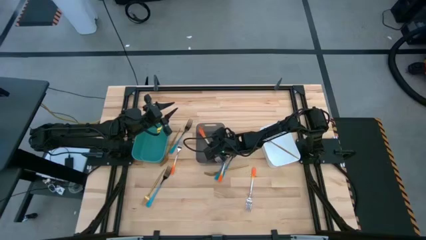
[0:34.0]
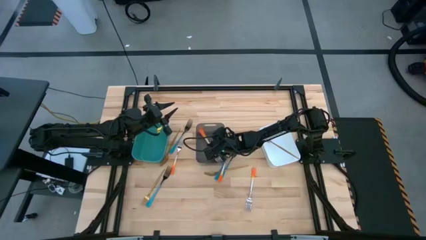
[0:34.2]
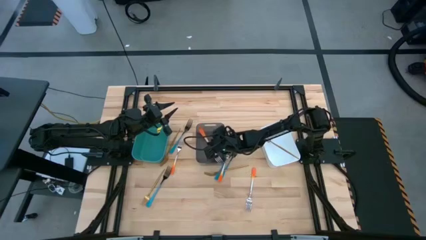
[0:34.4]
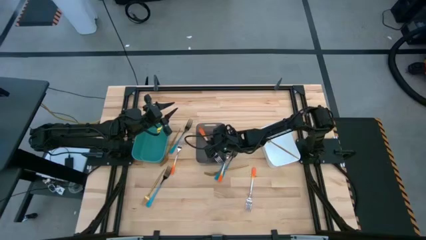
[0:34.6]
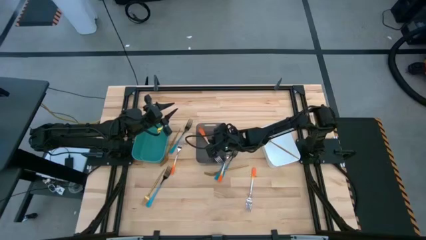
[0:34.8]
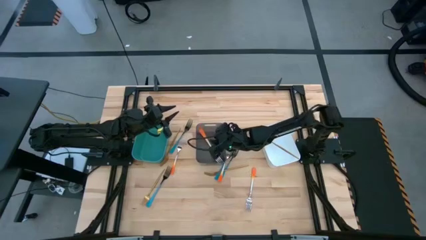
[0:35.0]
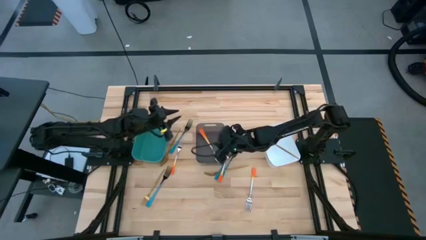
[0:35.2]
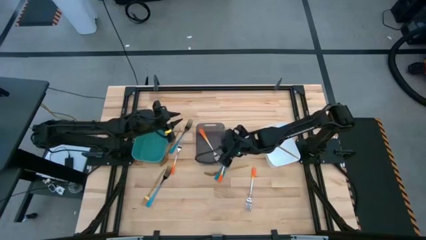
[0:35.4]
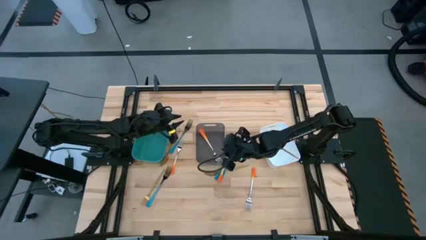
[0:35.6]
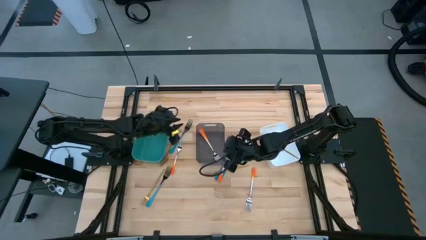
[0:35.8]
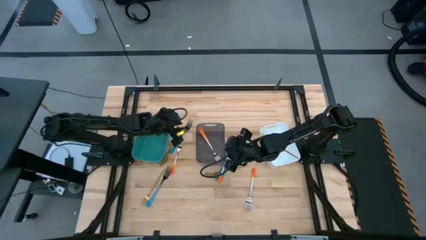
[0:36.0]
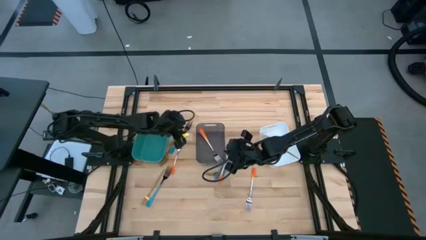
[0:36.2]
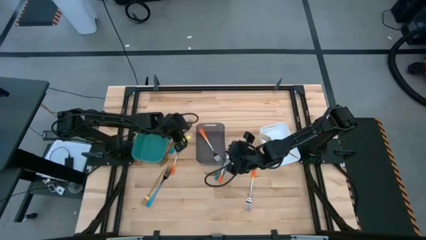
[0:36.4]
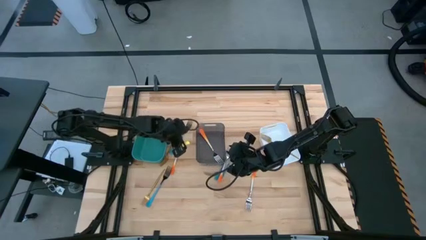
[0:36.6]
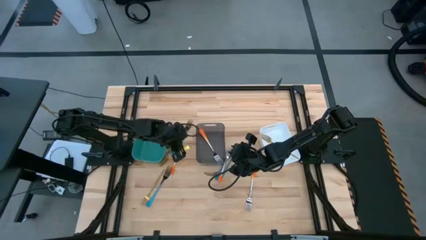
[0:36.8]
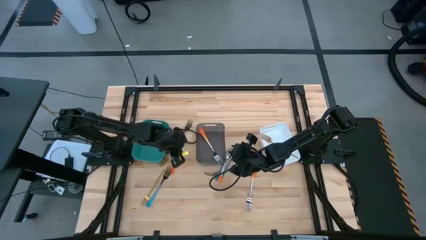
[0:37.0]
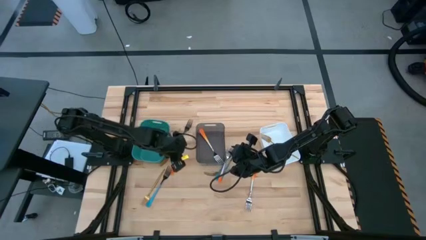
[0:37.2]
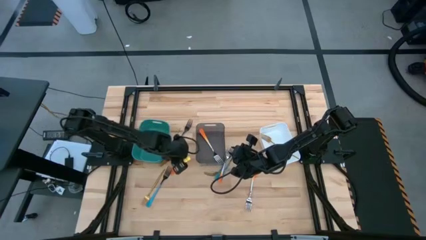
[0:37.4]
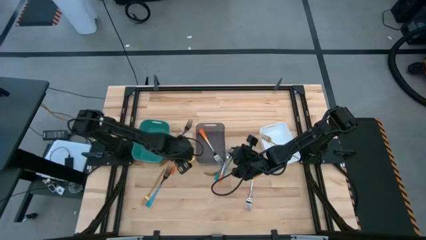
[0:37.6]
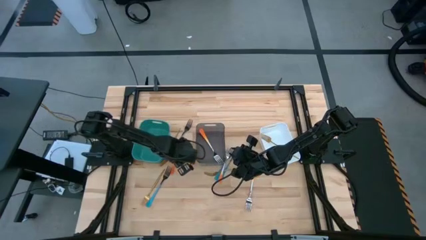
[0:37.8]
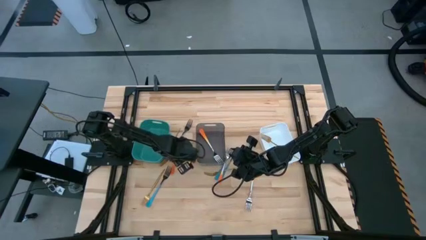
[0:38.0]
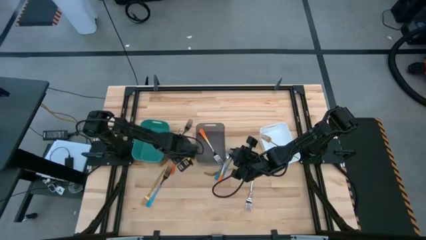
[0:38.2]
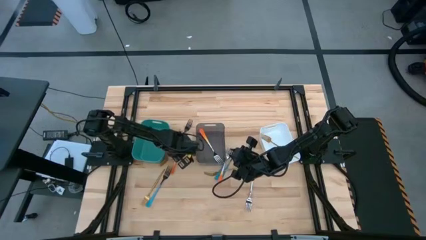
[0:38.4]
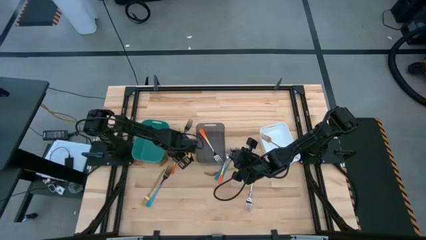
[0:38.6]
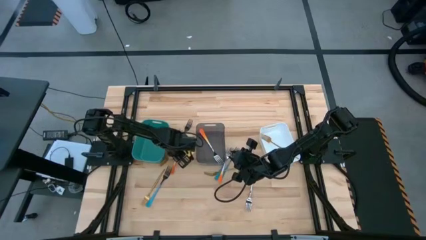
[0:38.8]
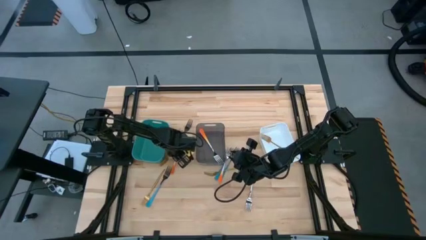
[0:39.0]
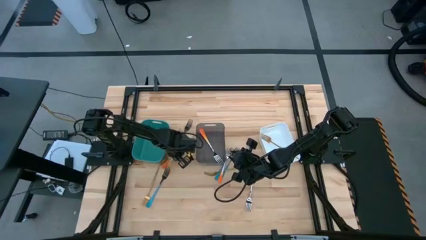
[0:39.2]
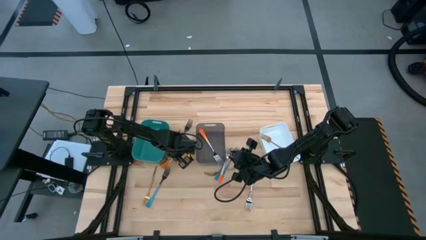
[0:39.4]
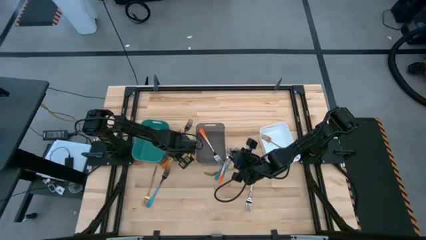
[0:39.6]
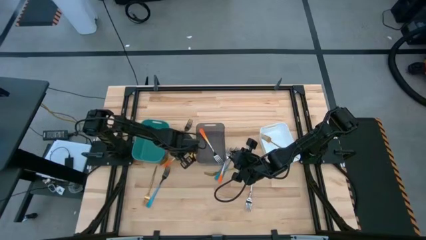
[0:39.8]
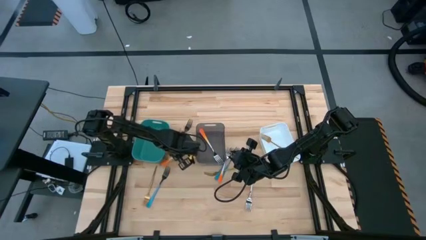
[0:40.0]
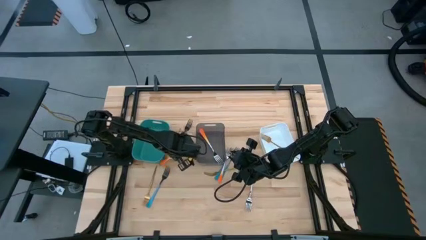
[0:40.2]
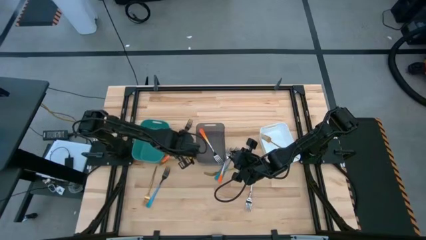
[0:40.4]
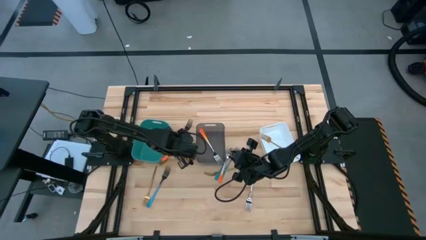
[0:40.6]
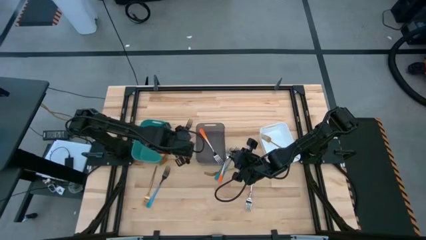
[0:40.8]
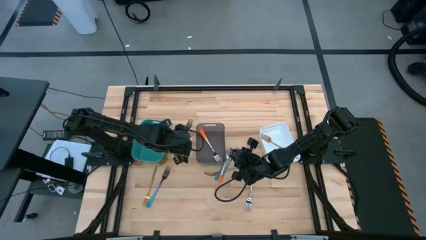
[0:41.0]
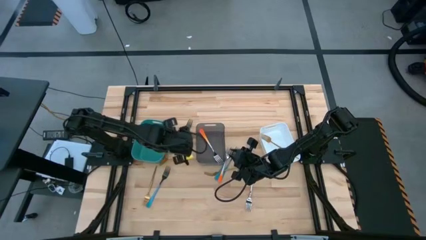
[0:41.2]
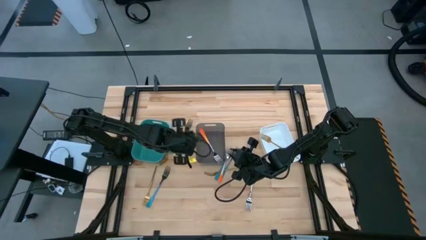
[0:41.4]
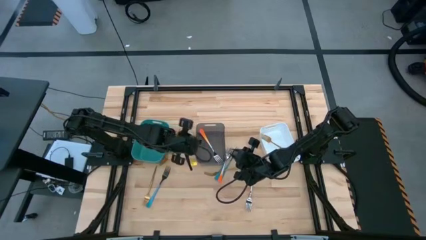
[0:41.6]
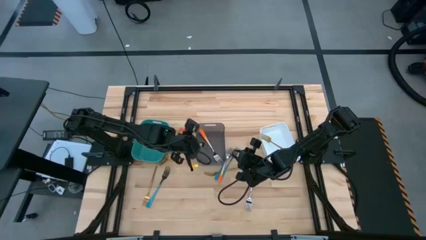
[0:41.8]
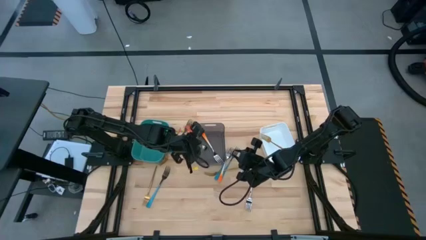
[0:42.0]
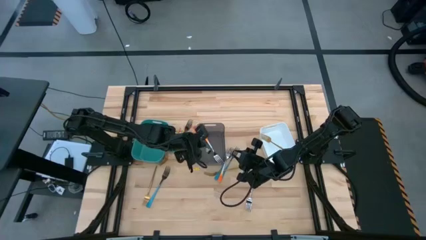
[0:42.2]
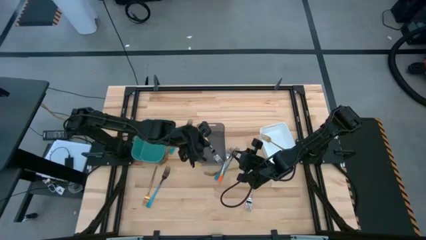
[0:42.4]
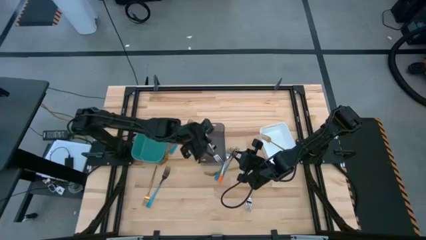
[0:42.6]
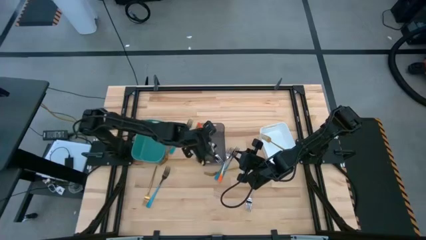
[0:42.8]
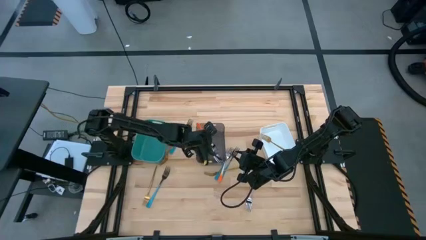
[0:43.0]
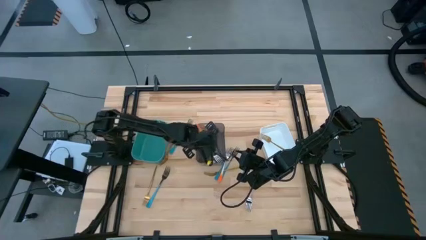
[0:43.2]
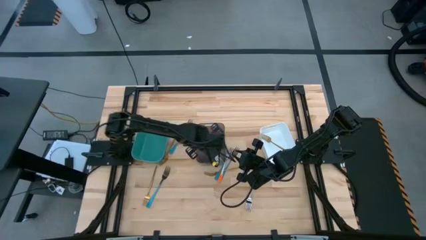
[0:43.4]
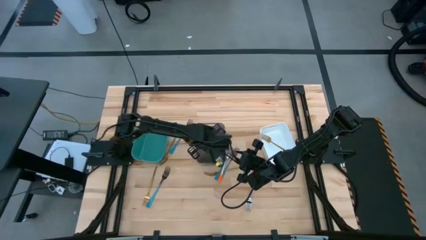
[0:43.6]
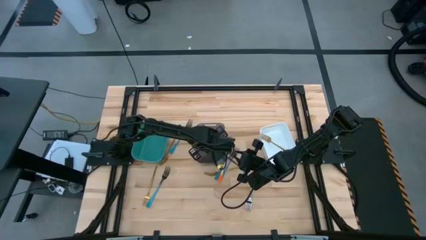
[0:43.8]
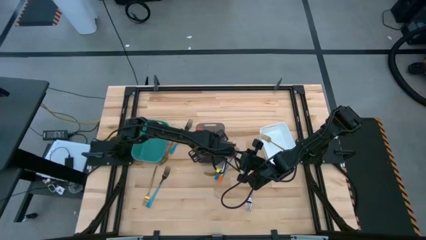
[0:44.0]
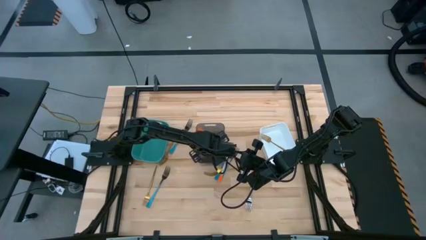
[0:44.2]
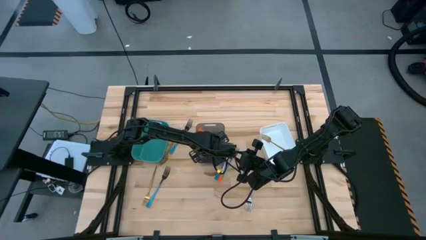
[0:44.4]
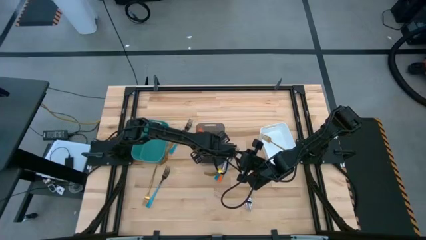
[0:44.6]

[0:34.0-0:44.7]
Task: Sort silverware by color (type)
Put the orange fork into the black bin

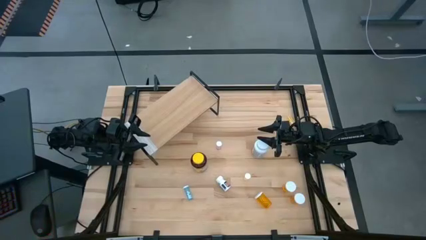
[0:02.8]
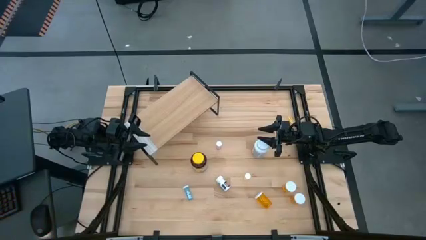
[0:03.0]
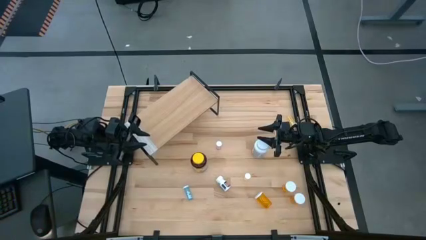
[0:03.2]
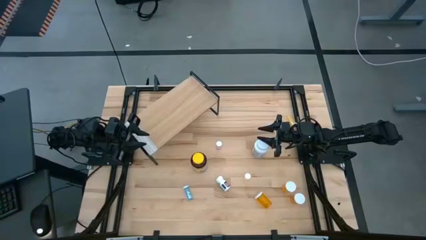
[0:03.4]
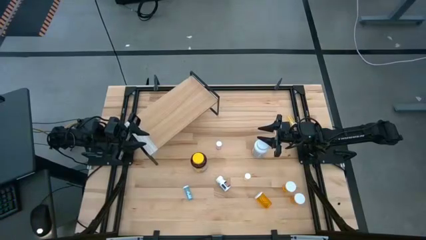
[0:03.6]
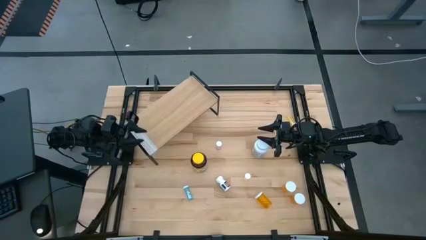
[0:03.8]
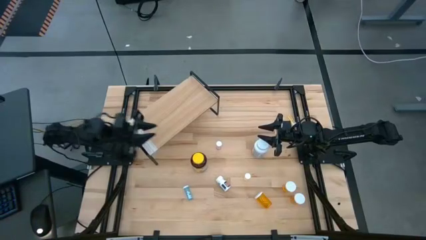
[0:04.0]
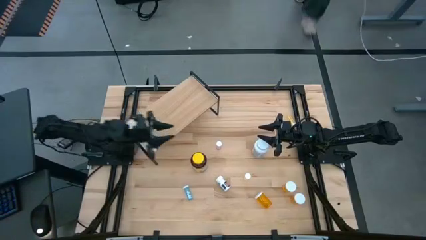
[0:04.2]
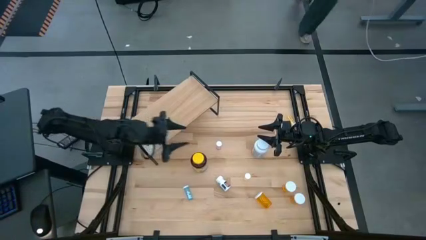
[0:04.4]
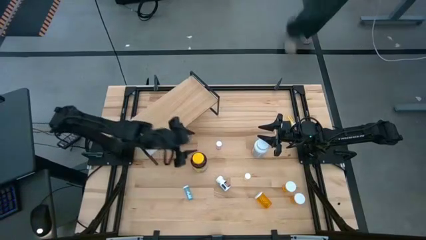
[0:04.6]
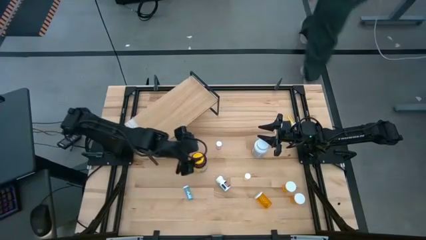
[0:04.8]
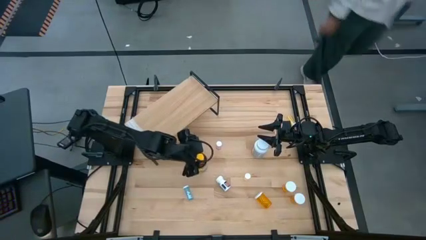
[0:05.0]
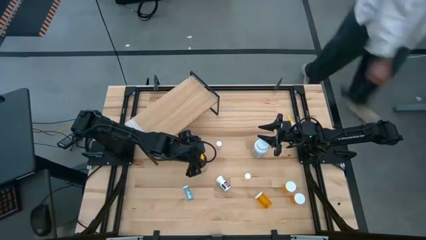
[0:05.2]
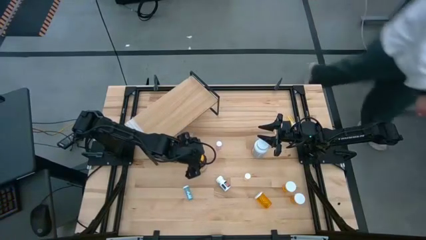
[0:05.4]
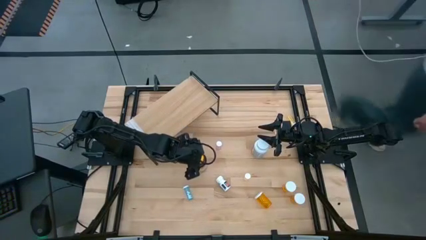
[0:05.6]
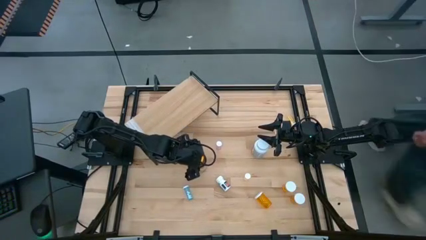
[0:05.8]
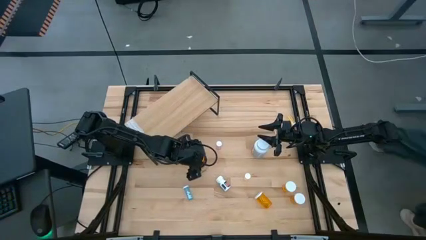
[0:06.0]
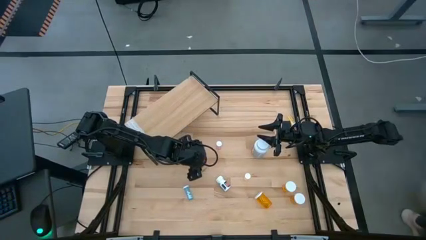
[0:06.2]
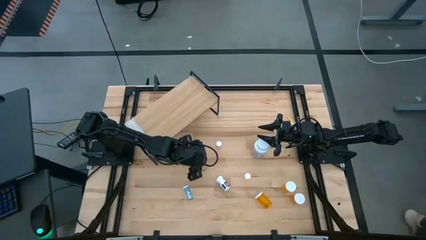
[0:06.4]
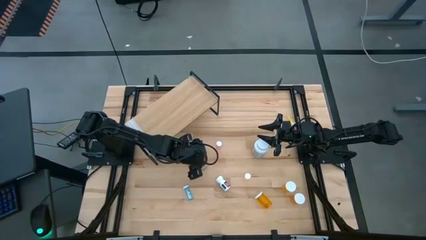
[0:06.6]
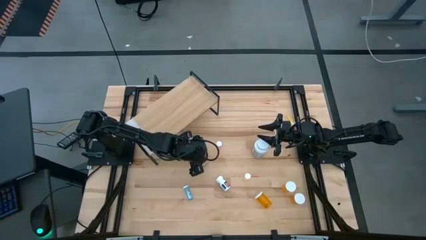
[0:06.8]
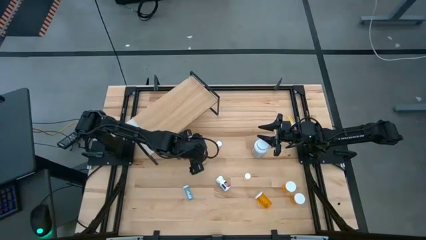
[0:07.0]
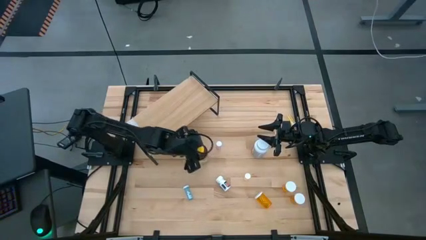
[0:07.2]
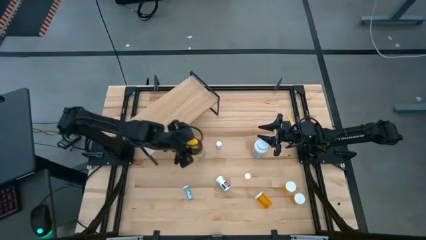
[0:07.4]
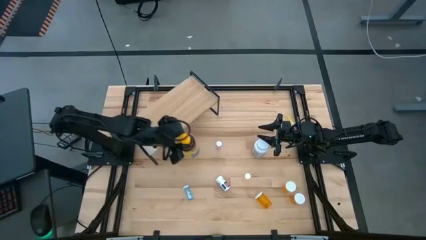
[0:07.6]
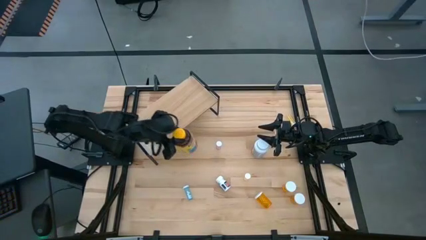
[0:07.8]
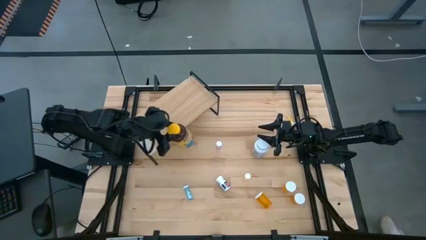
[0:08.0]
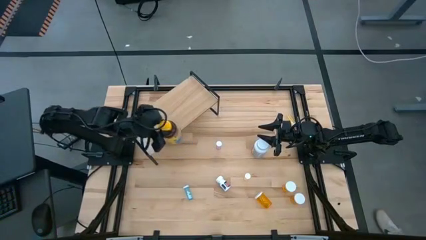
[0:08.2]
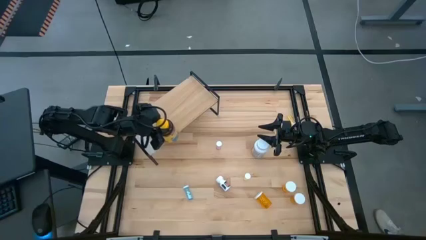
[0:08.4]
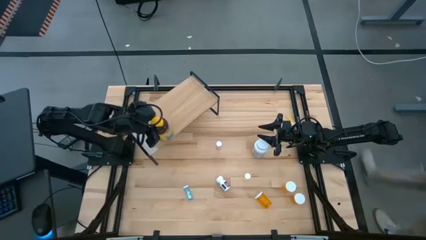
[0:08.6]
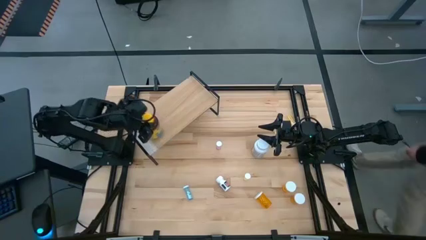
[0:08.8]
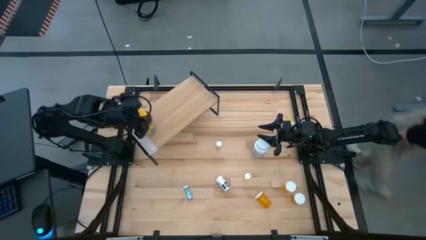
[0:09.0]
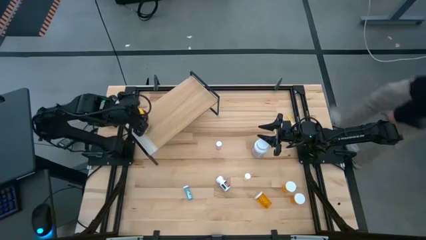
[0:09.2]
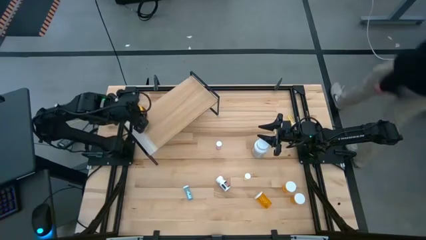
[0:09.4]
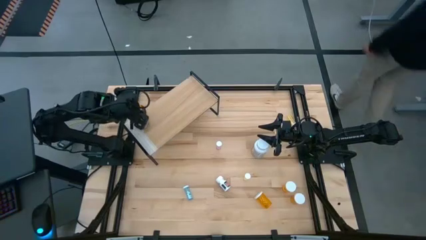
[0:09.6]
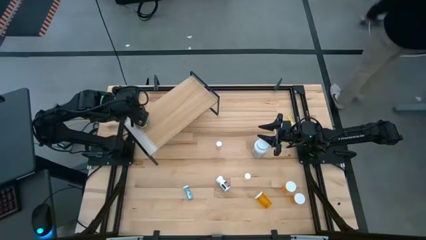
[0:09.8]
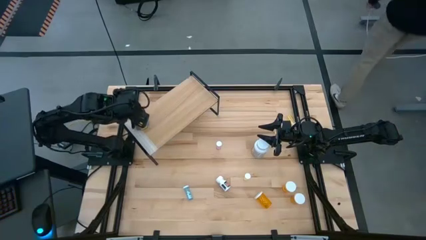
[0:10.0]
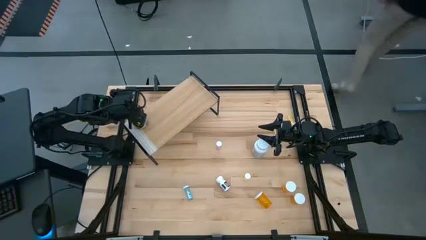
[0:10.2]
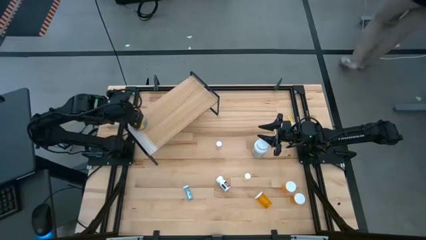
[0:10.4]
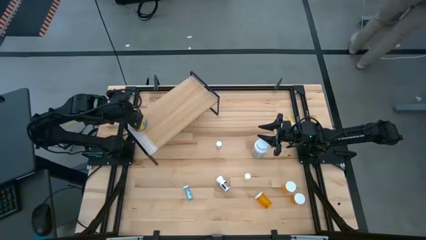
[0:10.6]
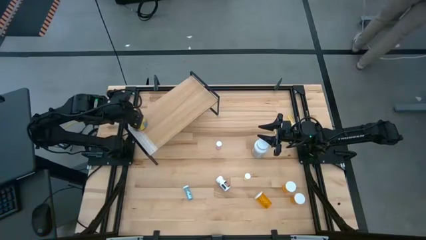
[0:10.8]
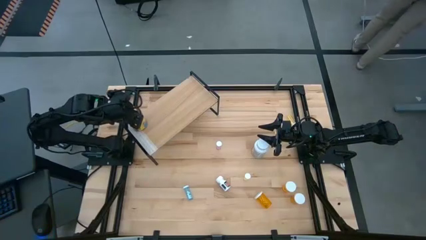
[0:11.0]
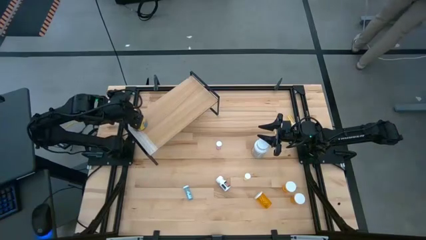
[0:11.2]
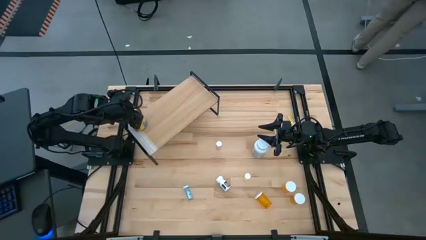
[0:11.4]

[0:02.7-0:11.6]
Task: Pick and place medicine bottles onto shelf by color
Put the large yellow pill bottle on the shelf
